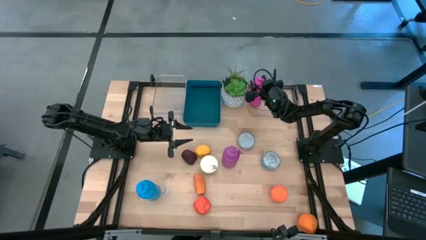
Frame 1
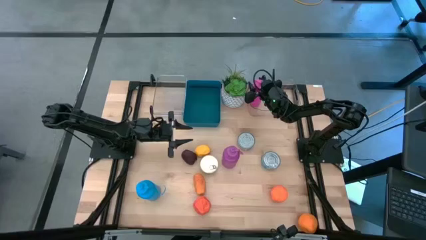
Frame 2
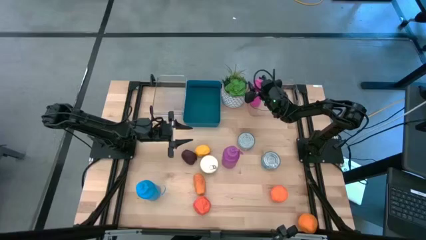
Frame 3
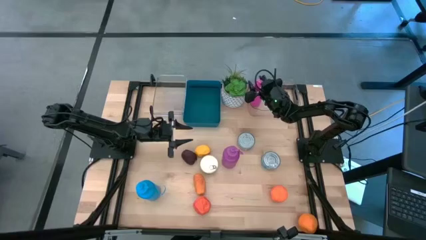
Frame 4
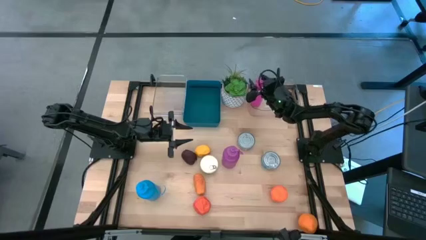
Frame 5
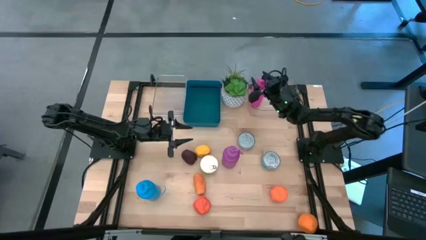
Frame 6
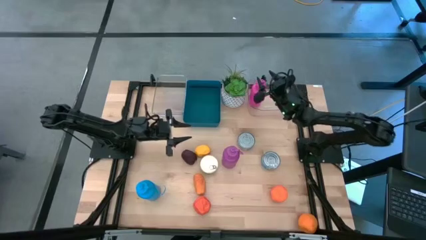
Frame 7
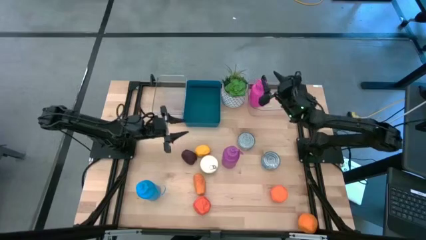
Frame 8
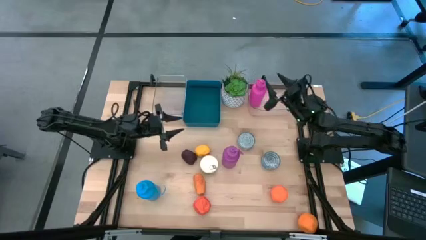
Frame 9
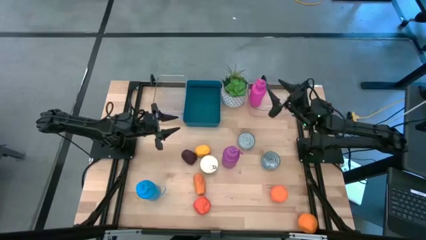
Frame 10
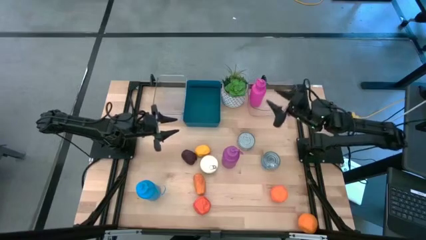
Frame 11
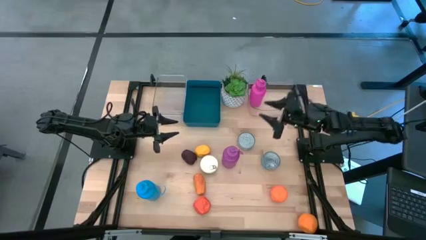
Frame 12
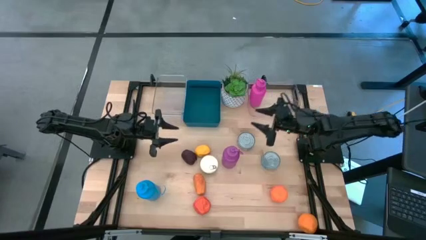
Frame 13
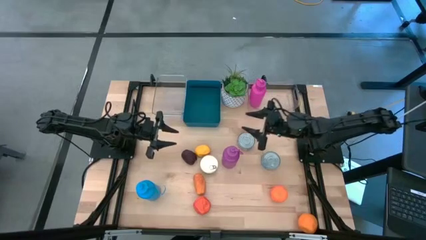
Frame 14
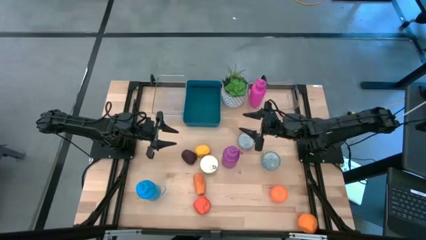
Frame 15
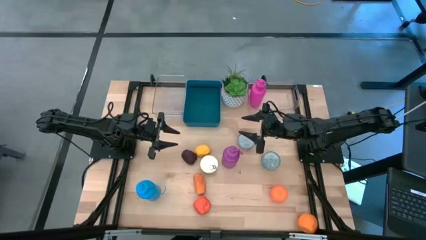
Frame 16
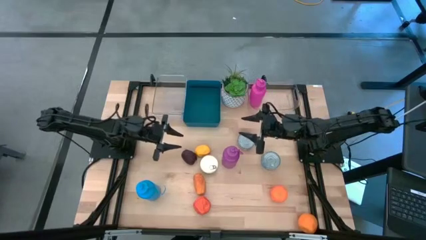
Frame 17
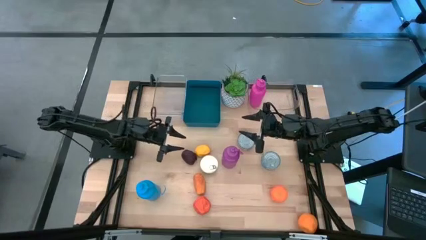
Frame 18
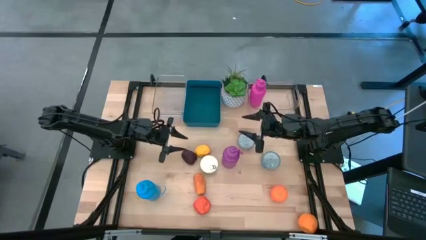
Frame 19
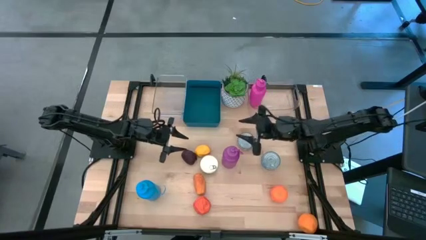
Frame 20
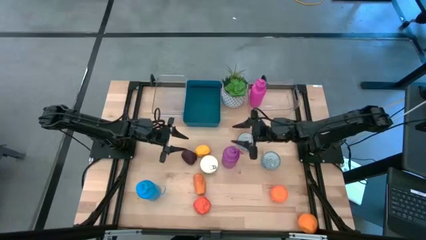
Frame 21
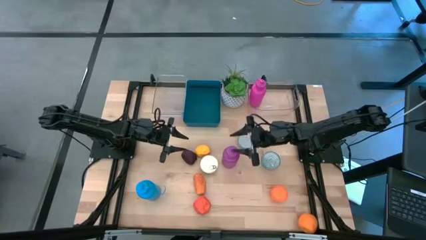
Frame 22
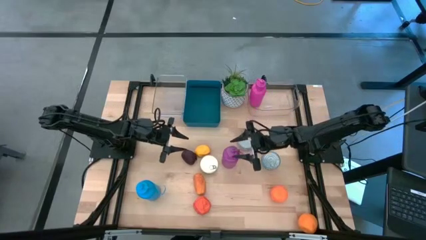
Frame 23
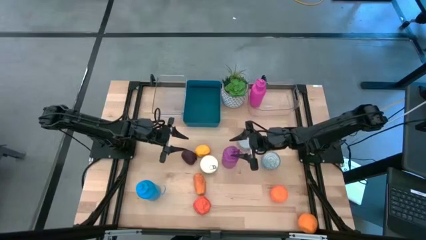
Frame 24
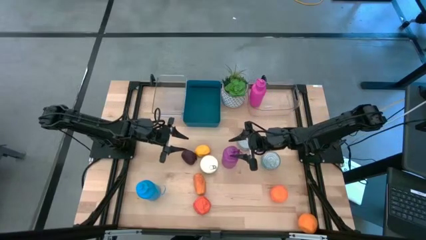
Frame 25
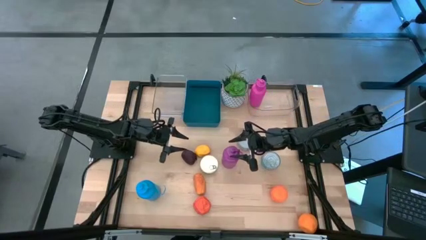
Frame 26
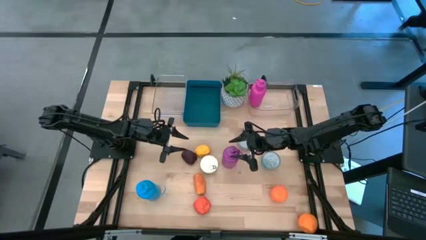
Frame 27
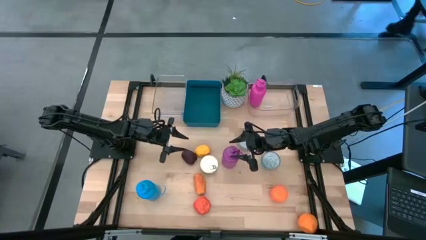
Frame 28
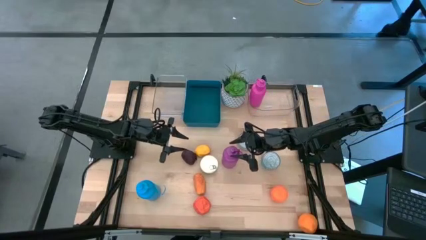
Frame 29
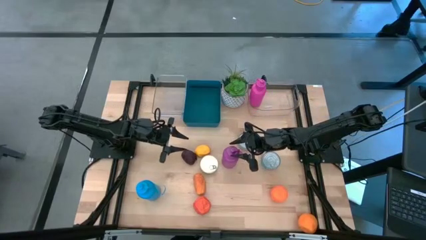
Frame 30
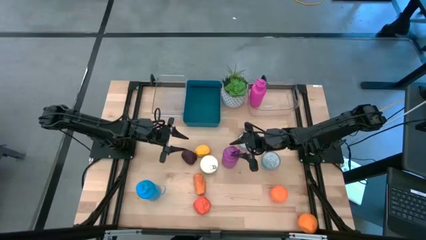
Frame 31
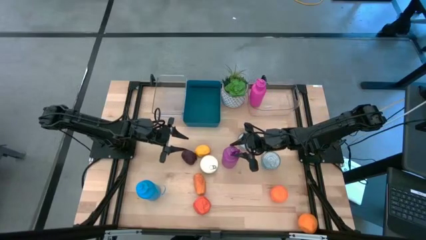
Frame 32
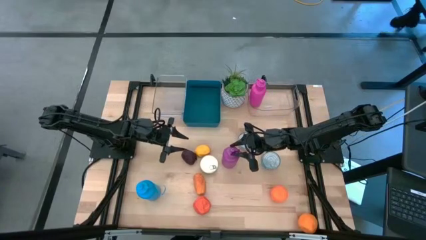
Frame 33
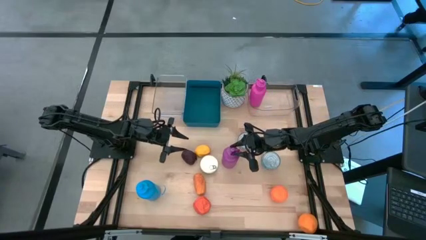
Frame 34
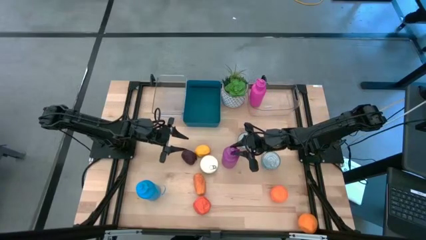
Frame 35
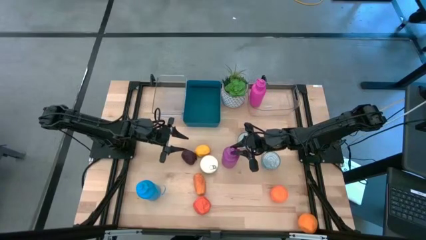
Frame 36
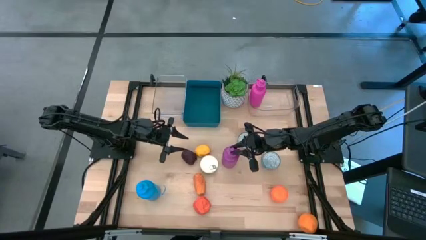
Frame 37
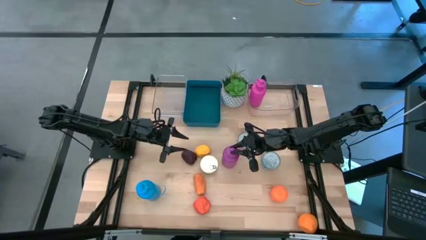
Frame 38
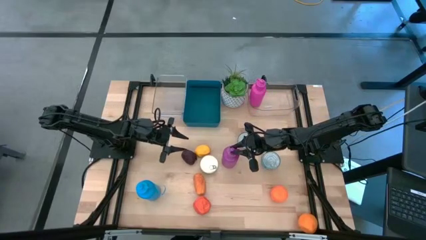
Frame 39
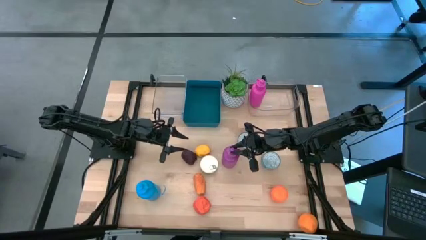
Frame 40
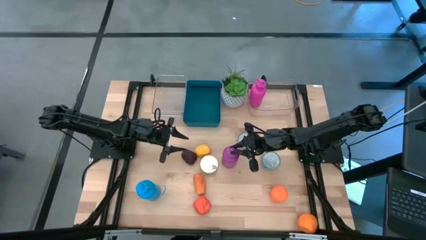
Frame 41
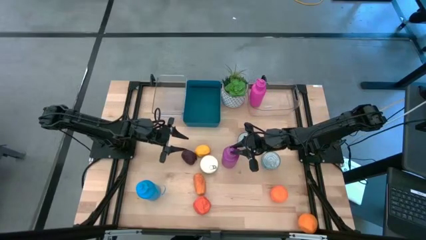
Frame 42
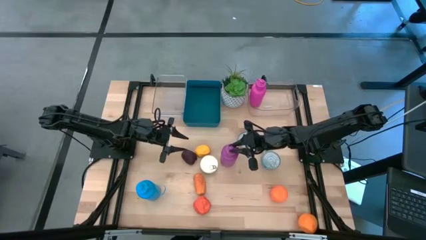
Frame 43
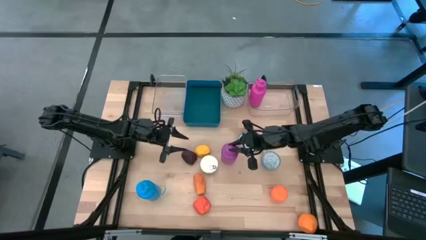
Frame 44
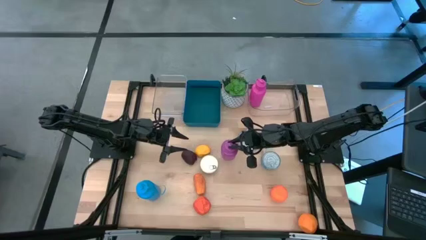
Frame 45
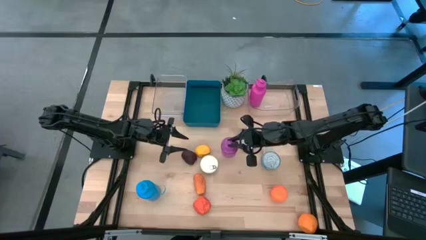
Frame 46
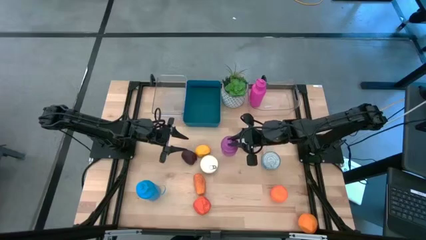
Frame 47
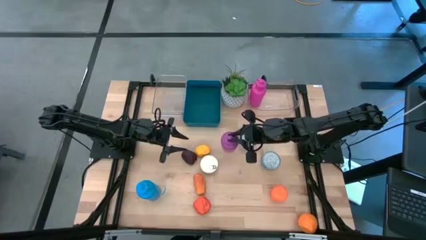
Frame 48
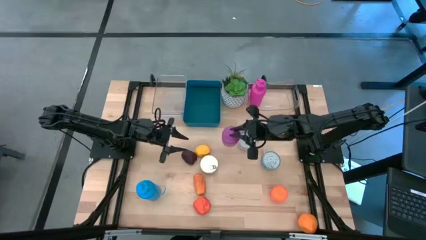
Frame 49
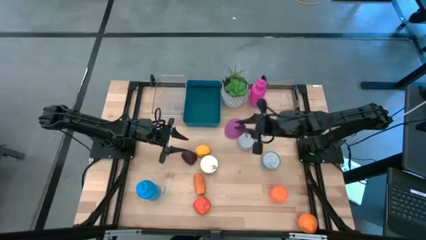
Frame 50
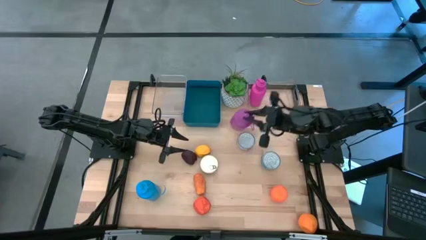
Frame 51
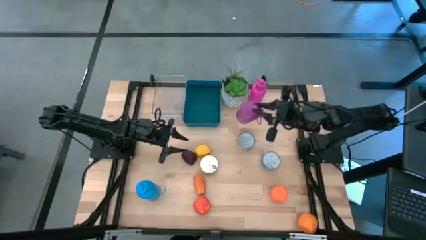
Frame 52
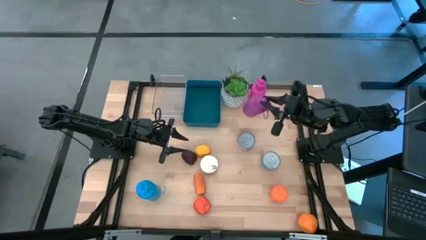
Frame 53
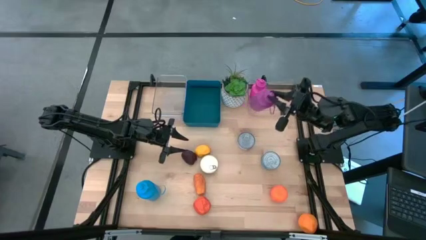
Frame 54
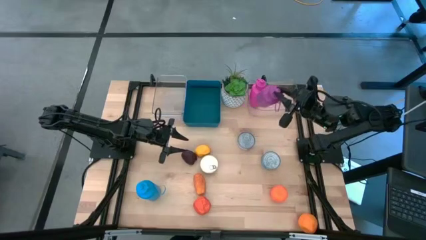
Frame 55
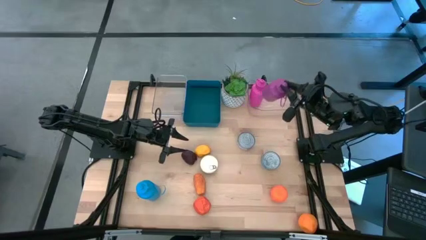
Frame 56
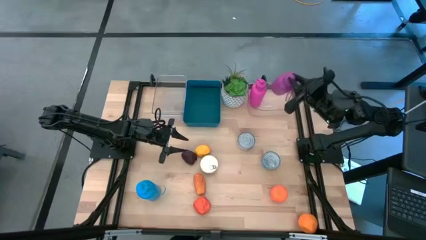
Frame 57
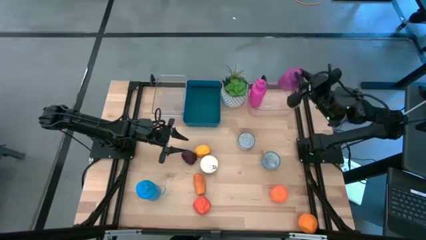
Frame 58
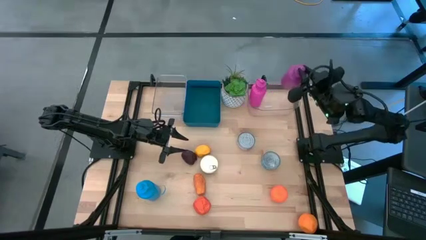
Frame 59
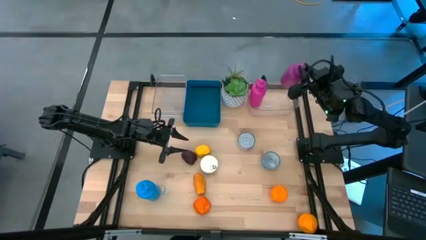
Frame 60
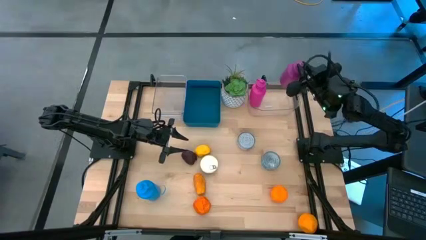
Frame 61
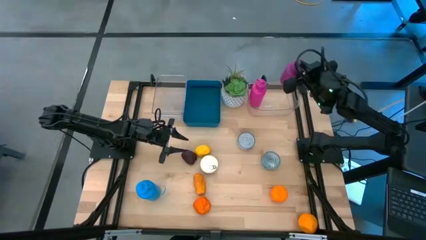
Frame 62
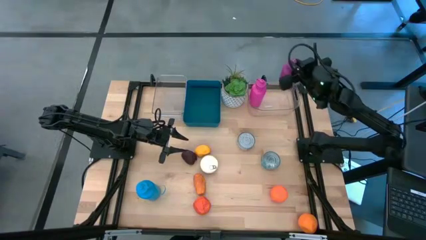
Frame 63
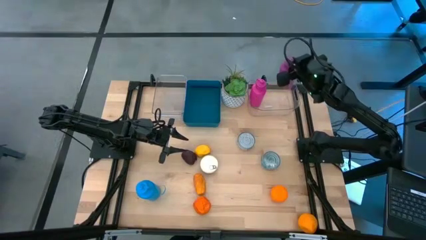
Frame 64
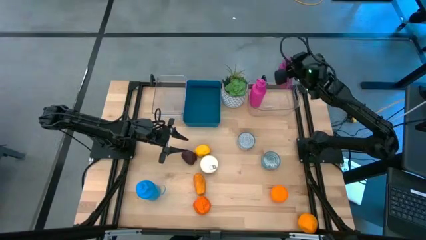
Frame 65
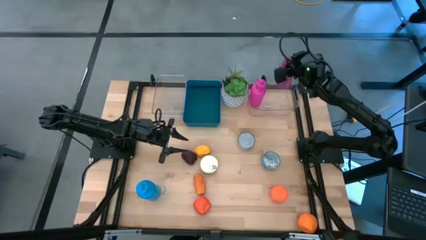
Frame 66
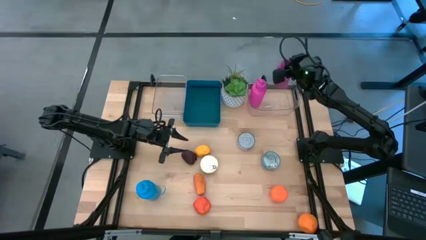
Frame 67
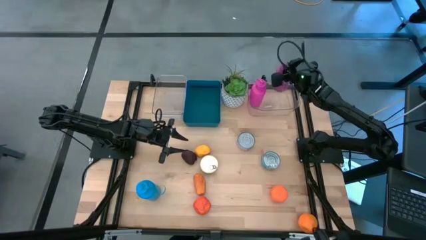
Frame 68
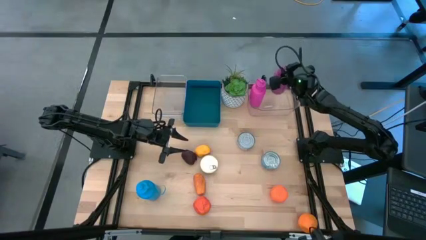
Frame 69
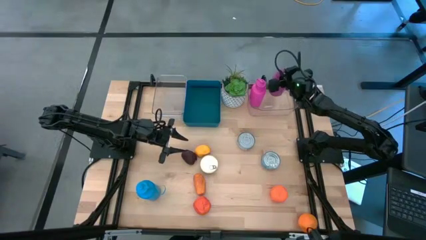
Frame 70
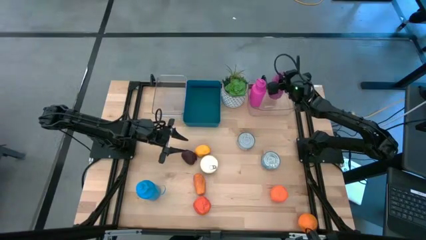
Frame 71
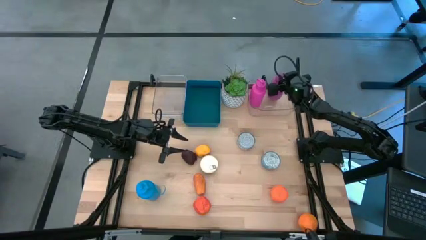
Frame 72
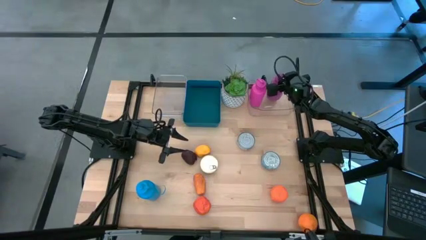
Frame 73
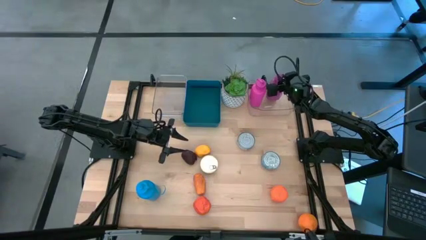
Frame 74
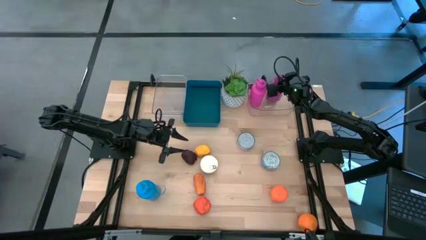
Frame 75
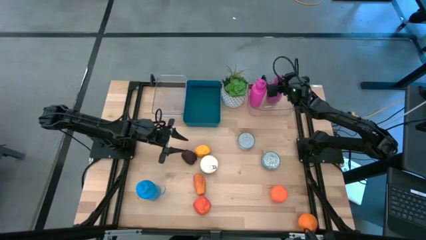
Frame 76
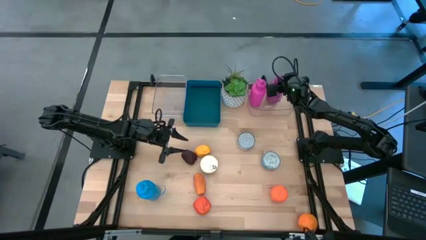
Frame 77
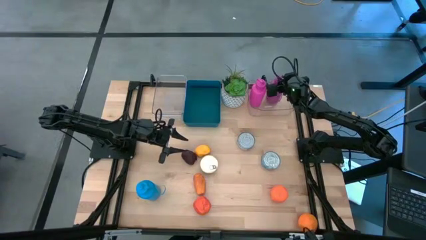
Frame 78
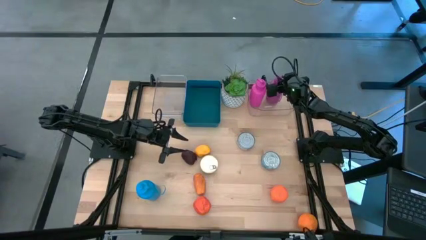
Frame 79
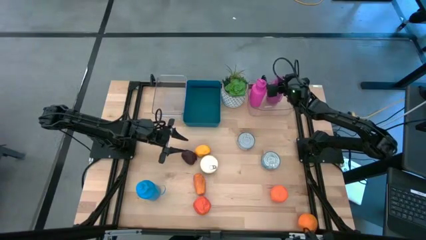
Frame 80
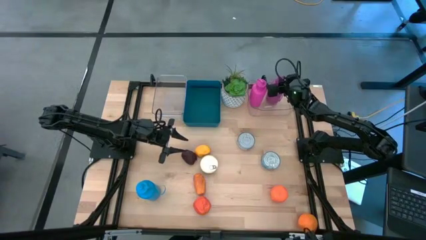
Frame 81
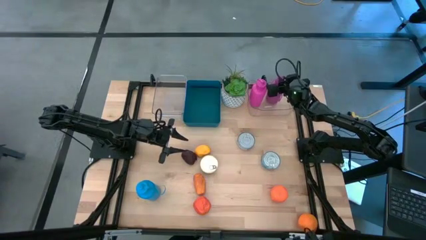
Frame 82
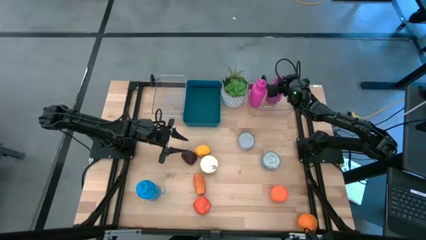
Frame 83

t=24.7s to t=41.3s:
Task: Pick & Place Food Item
Put the purple bottle into the right transparent bin
